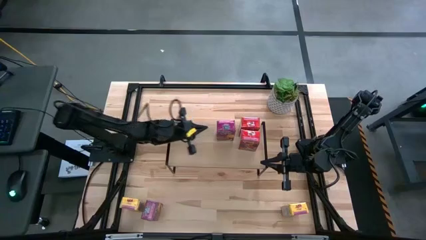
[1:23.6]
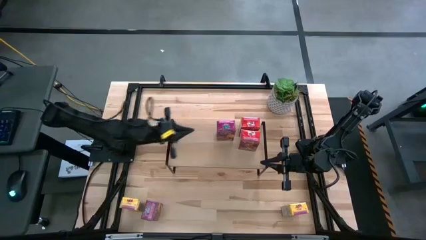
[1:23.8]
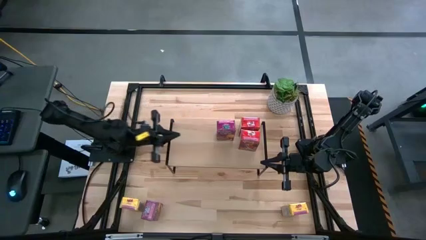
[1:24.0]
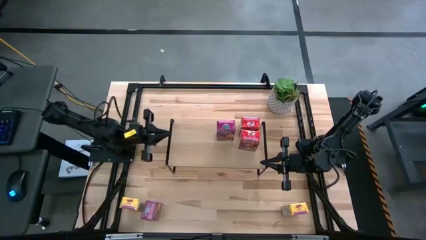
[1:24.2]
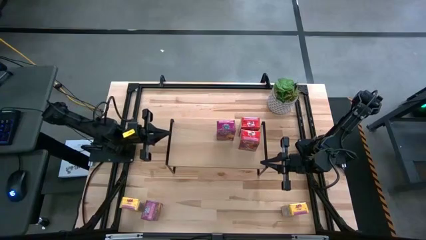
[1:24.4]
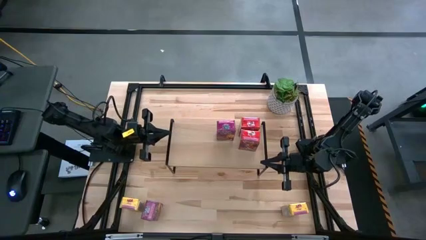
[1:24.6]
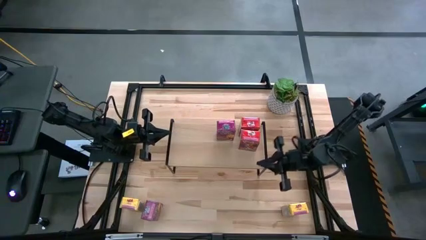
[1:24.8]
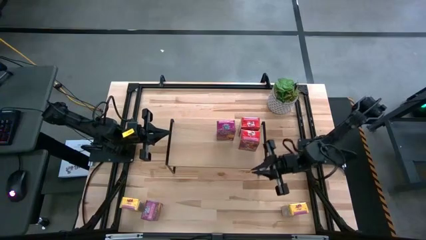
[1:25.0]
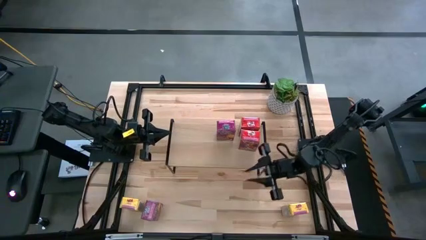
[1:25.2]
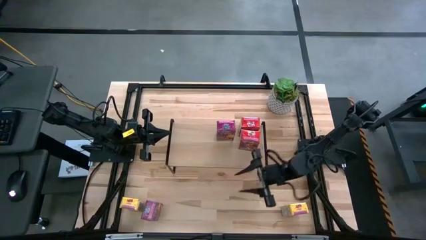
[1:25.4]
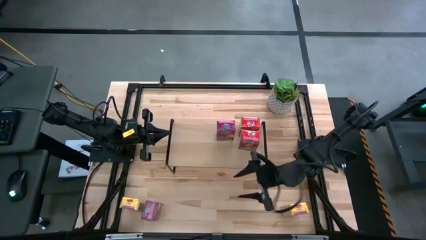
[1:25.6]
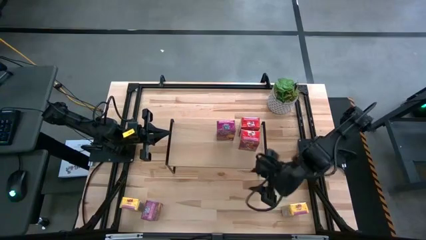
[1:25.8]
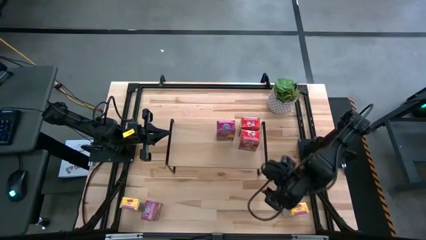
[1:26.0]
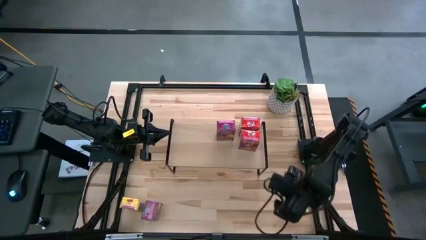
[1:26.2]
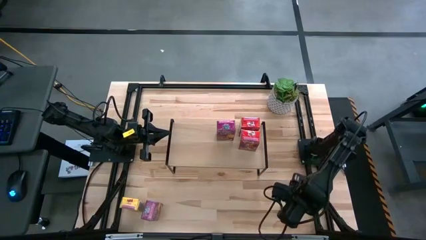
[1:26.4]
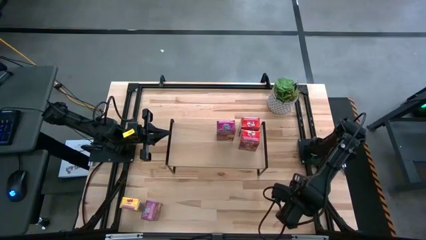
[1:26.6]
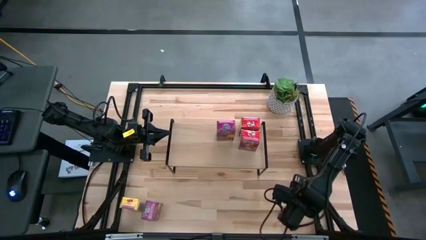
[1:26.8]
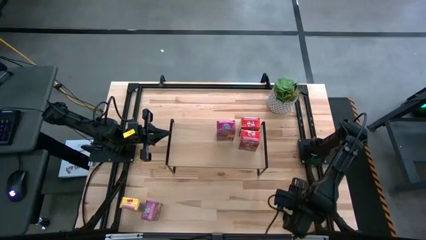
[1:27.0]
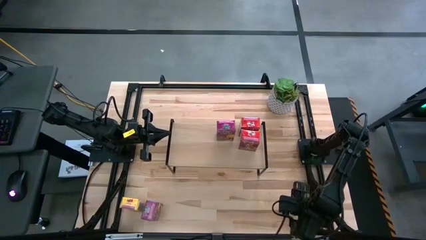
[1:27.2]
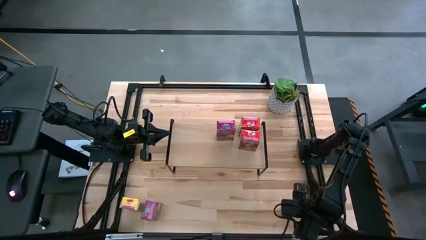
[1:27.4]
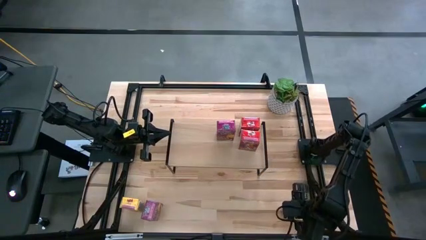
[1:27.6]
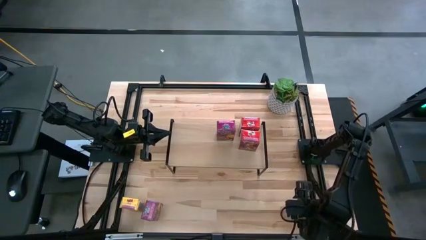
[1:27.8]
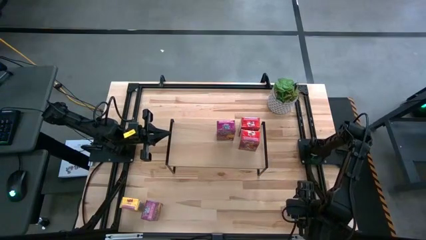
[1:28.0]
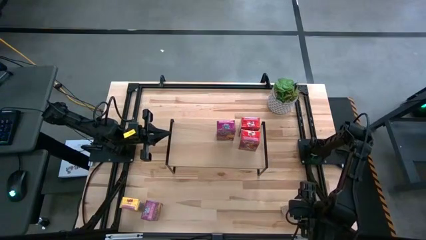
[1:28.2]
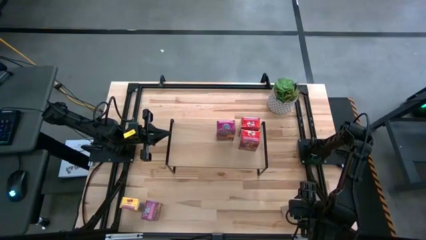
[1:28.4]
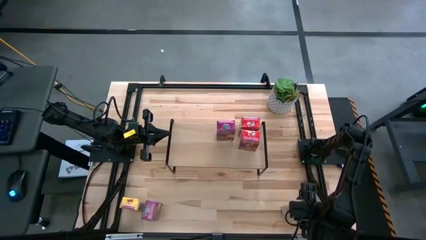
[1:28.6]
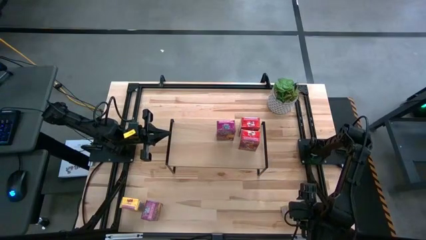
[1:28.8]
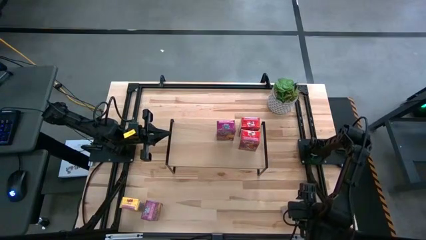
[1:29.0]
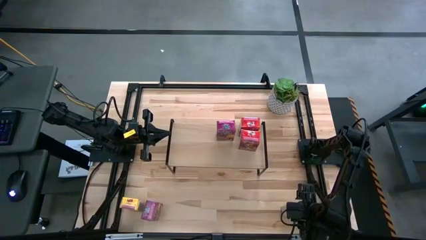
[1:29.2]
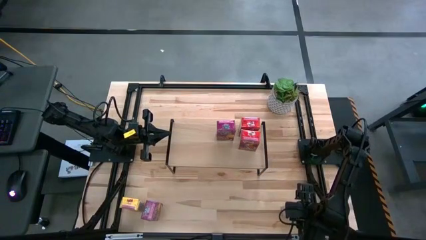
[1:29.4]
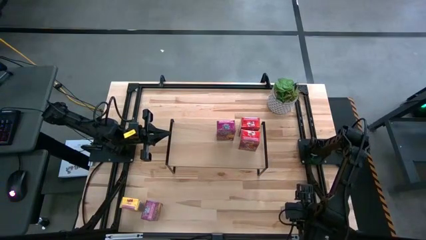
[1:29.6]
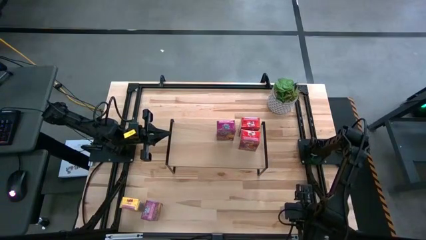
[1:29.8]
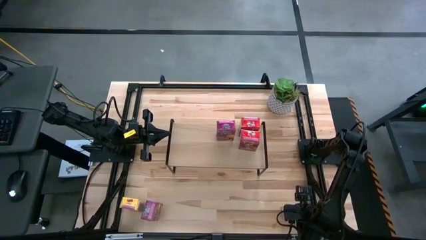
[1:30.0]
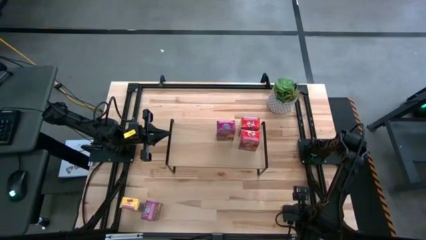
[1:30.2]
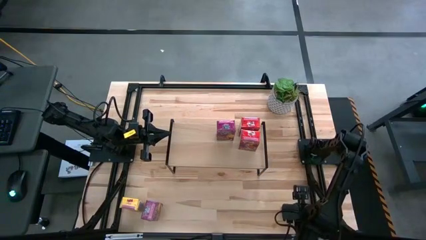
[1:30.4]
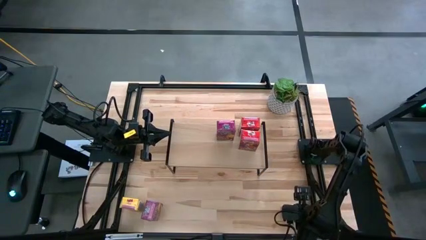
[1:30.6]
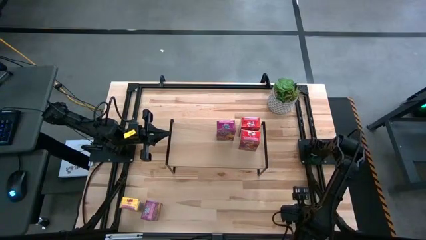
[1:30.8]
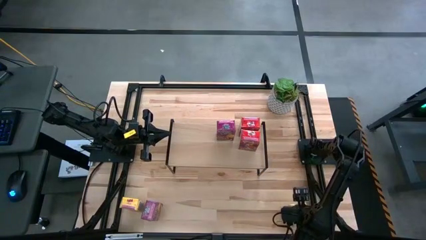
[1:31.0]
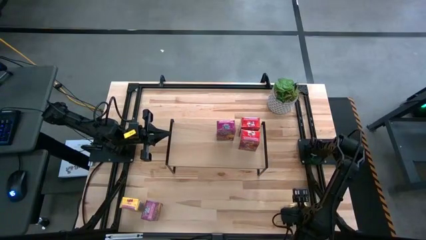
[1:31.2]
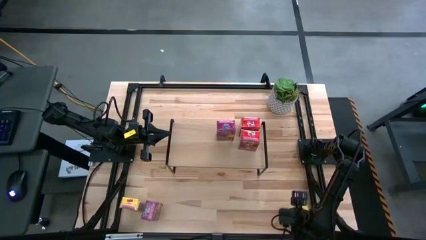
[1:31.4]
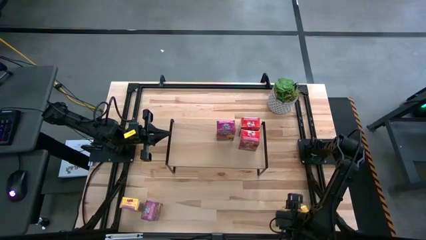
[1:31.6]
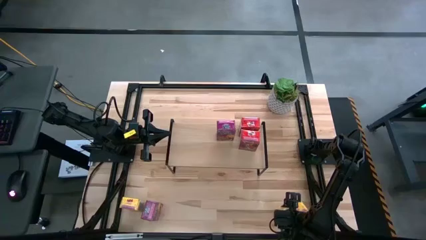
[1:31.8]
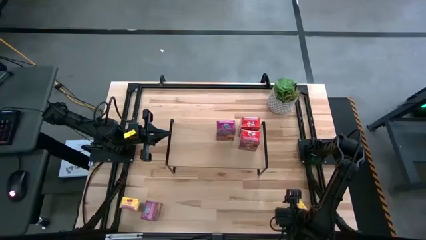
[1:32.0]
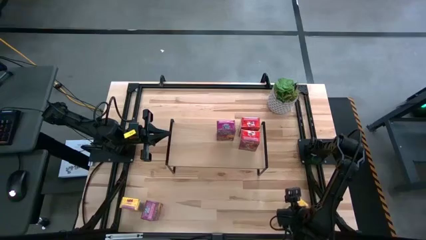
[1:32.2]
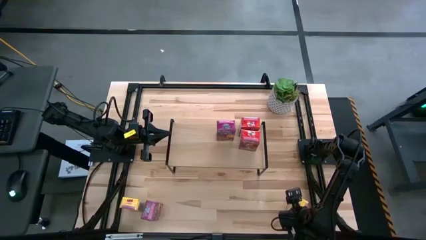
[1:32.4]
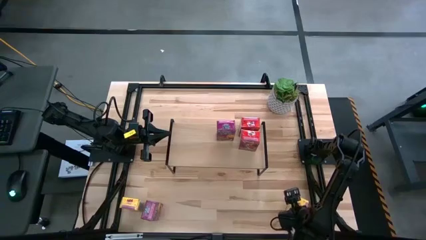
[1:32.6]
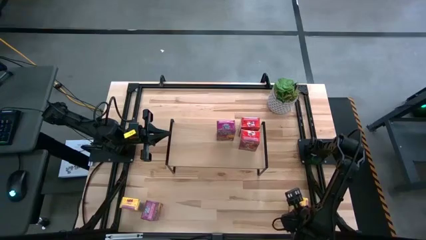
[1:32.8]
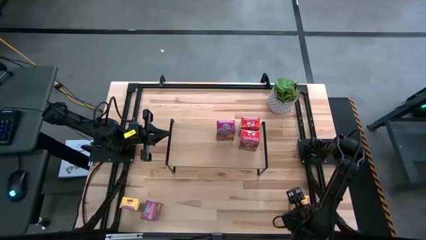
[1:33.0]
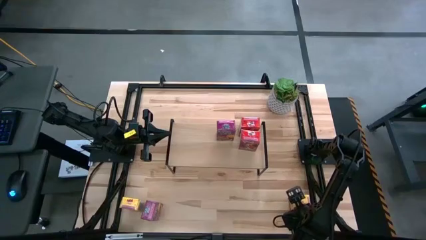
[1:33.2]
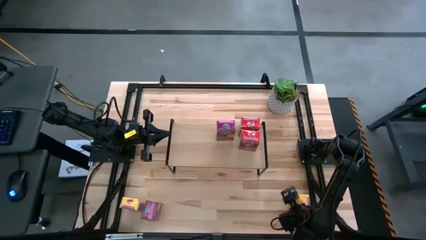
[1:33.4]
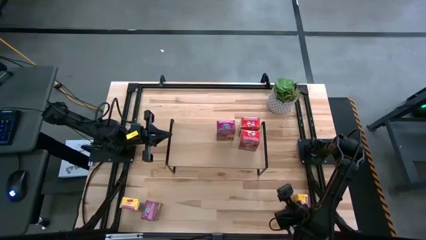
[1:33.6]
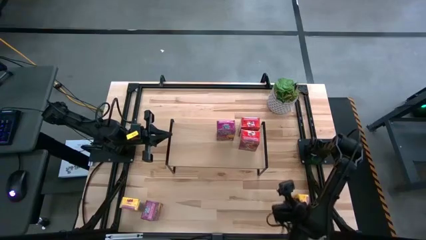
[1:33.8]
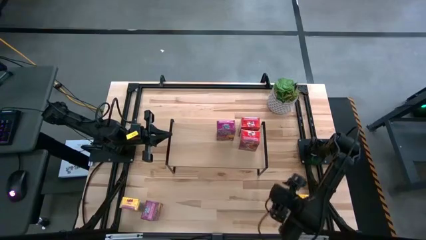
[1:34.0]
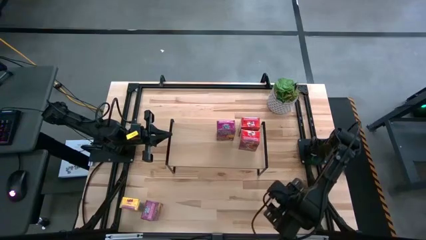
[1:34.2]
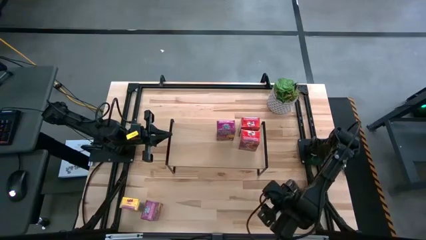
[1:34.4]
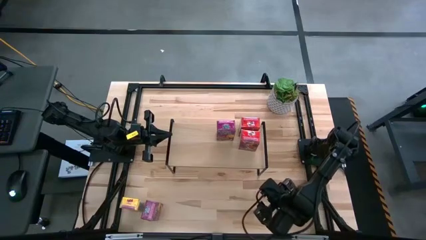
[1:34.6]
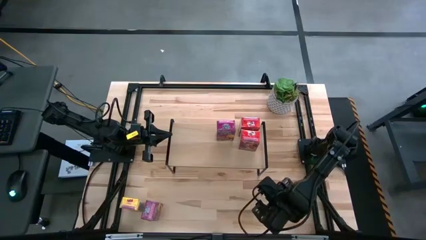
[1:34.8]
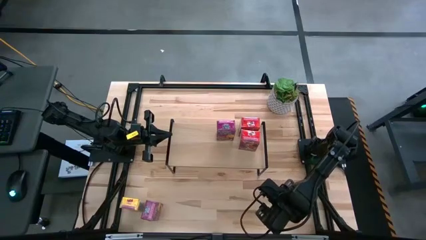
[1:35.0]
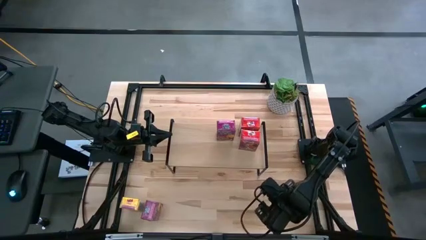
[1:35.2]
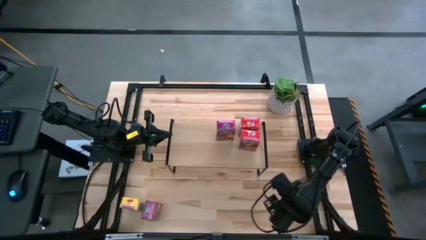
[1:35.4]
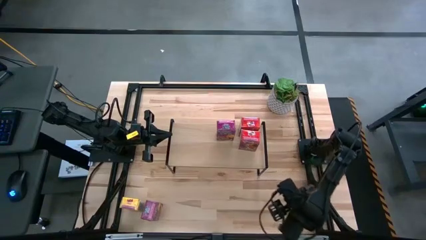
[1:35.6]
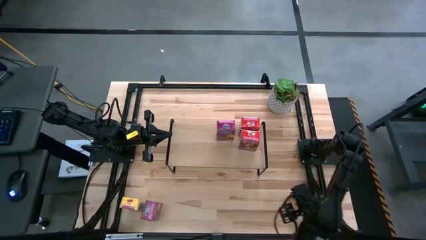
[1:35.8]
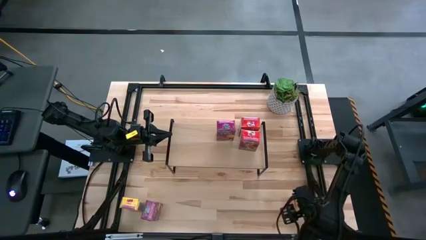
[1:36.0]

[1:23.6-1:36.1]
Task: Stack cereal on shelf
Put the right yellow cereal box on the shelf

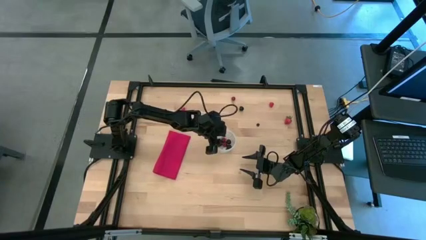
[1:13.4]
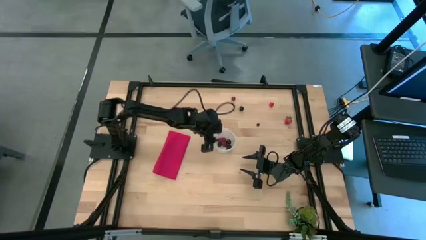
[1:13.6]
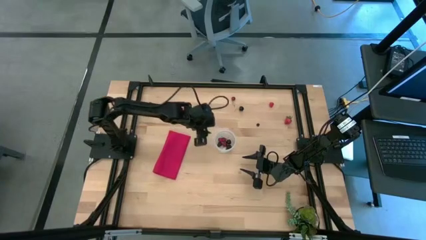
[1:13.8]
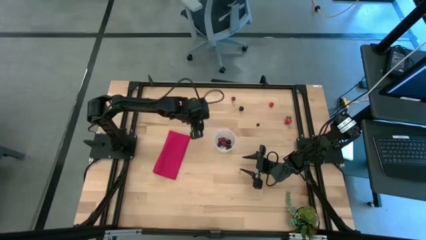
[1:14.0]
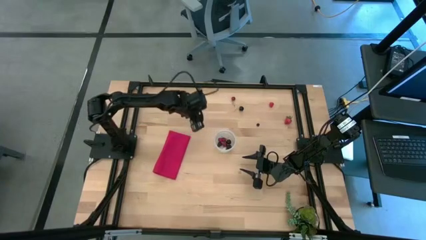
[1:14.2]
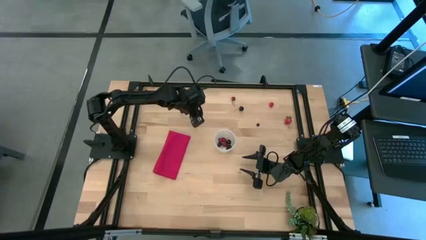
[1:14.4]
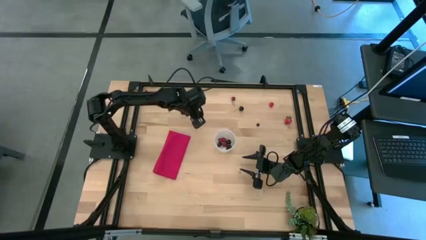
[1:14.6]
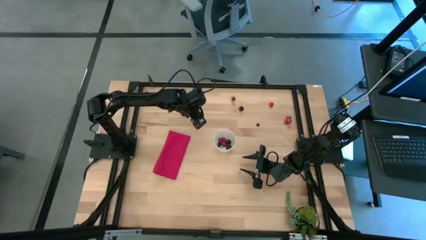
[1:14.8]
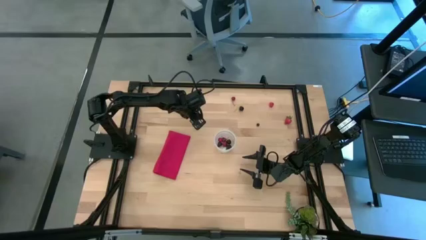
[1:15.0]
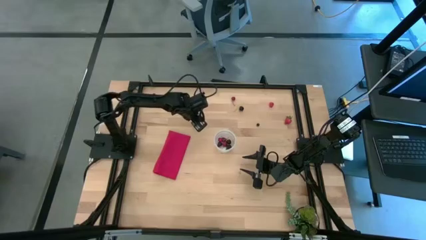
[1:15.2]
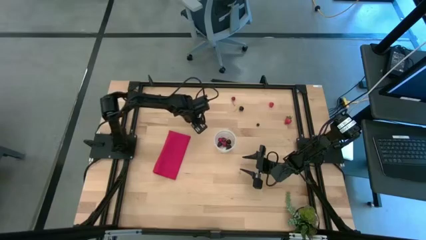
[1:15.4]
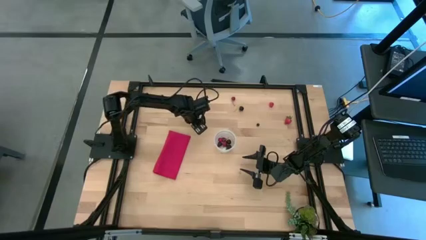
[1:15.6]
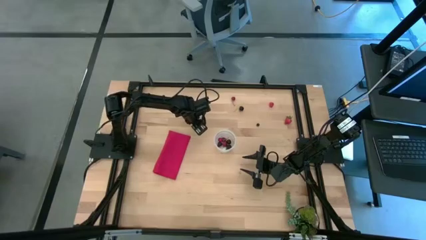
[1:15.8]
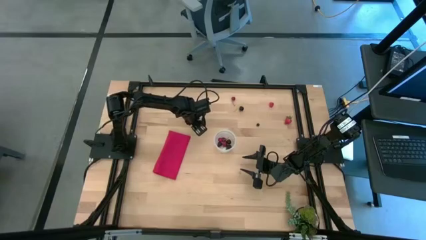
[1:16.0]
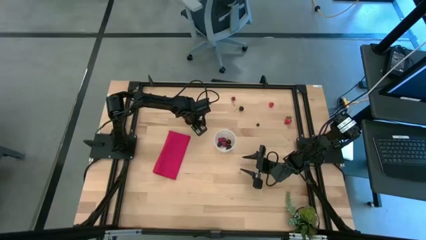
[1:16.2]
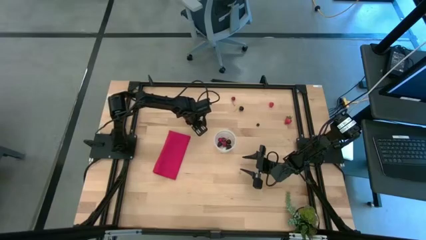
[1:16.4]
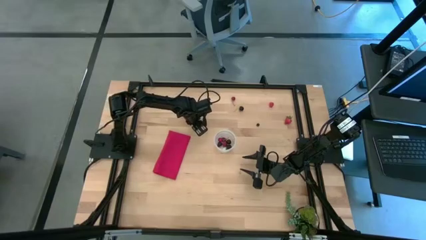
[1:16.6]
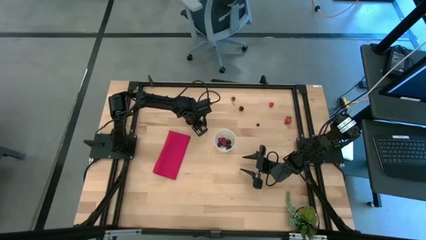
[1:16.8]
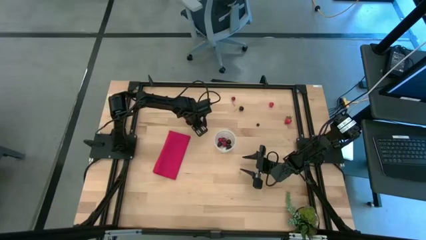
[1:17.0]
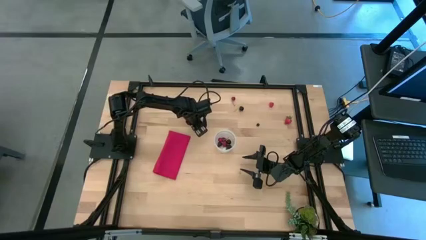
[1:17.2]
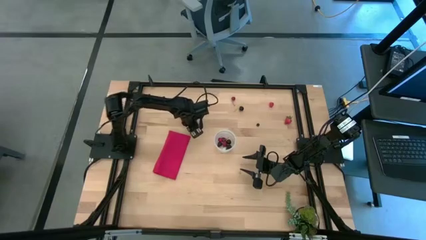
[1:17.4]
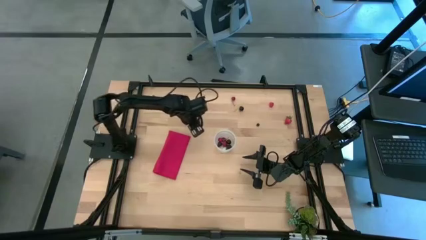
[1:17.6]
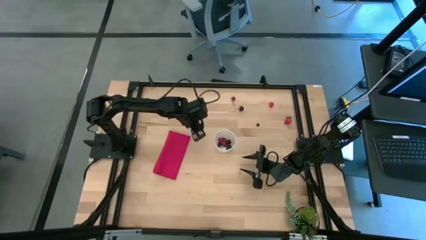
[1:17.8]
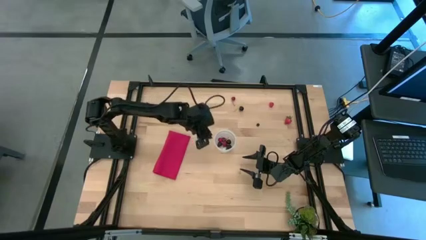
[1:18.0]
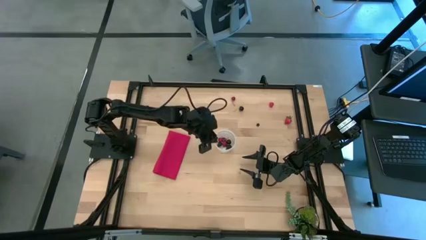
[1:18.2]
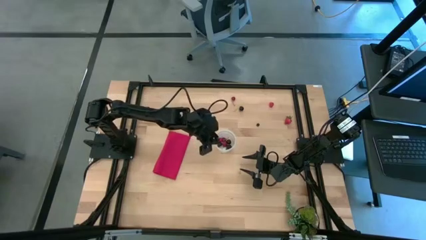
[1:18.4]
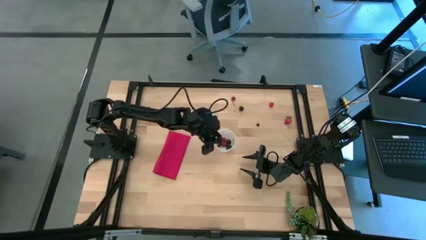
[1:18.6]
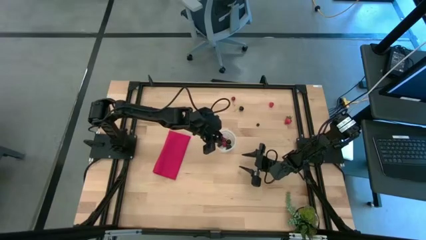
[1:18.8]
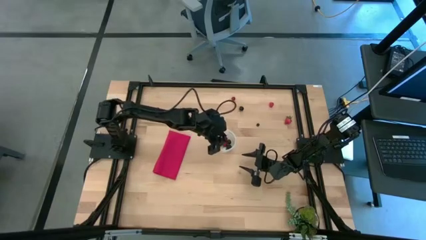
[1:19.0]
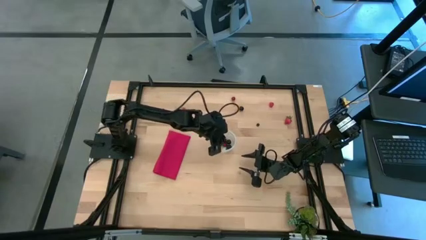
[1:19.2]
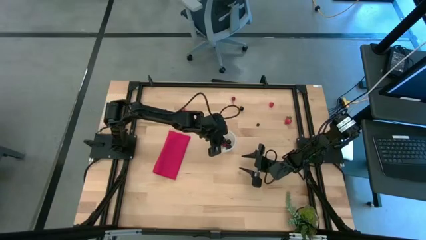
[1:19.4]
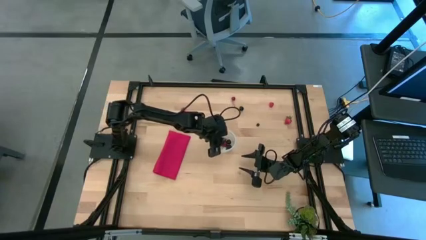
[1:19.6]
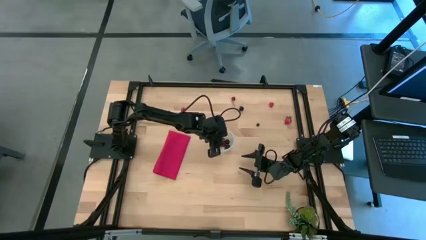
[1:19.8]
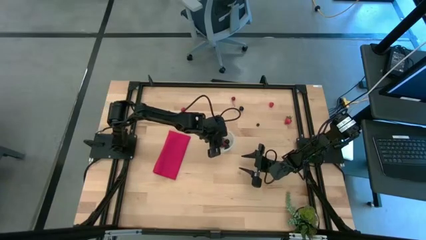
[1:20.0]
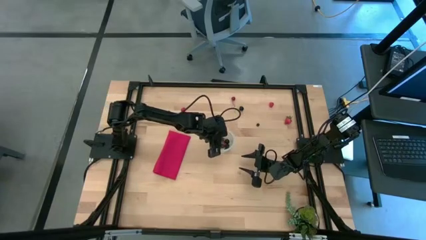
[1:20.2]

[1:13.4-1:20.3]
Task: Pick and placing Produce into tupperware
Put the black cherries into the transparent bin
